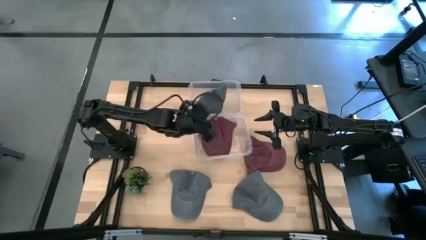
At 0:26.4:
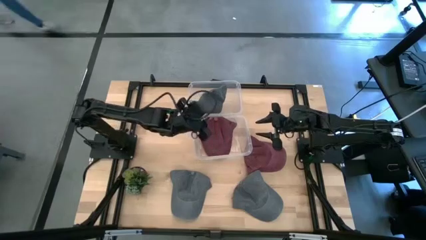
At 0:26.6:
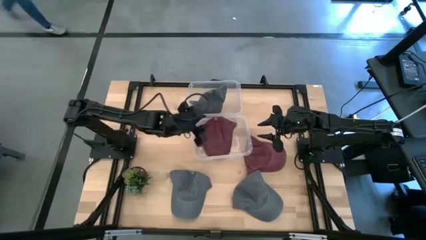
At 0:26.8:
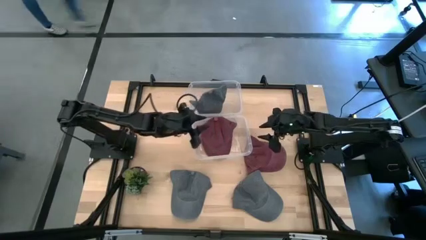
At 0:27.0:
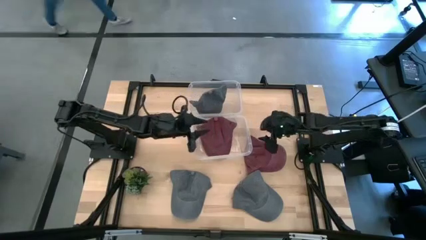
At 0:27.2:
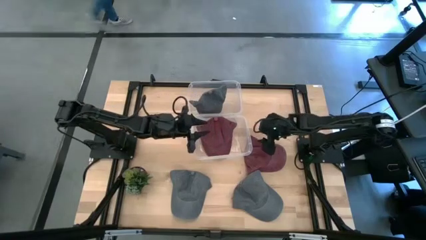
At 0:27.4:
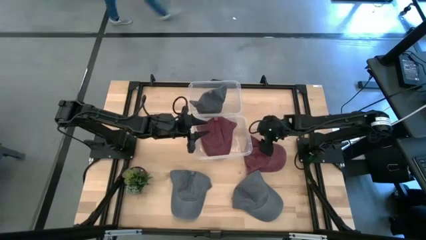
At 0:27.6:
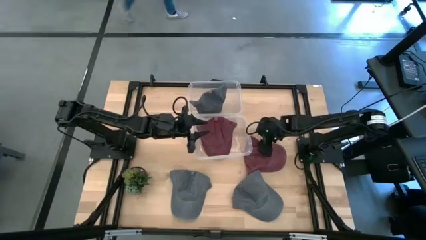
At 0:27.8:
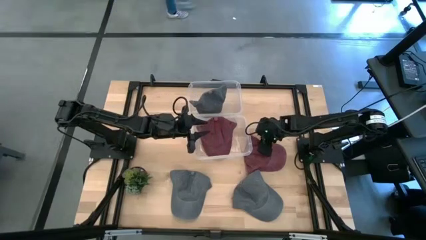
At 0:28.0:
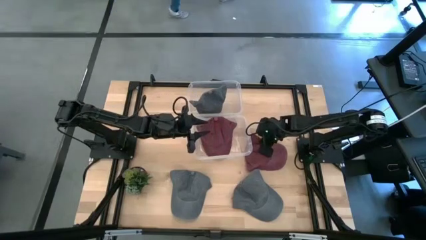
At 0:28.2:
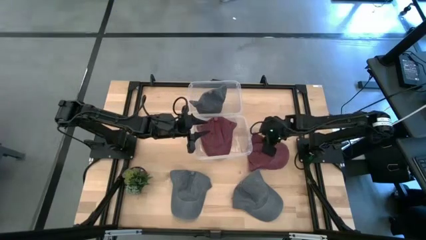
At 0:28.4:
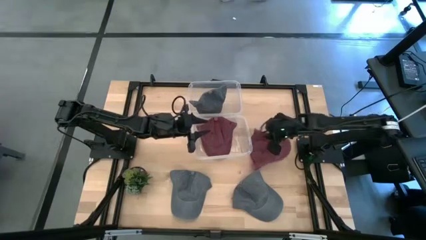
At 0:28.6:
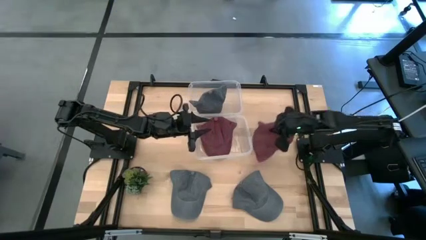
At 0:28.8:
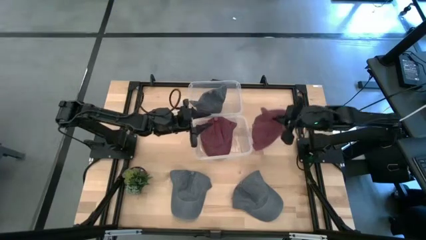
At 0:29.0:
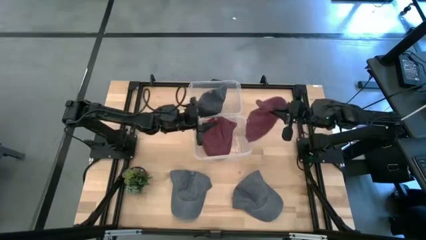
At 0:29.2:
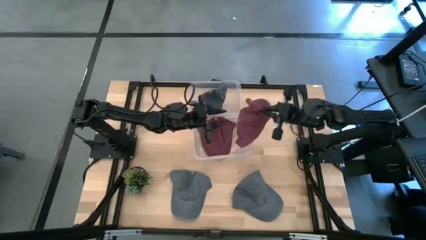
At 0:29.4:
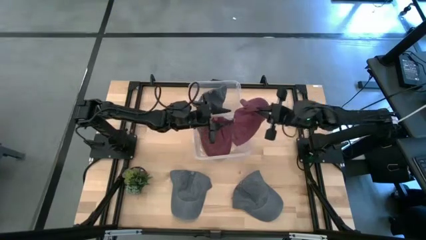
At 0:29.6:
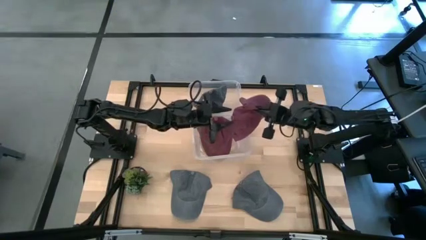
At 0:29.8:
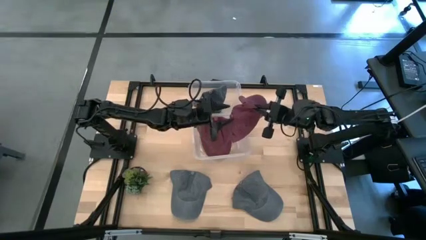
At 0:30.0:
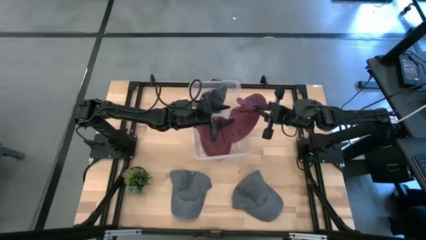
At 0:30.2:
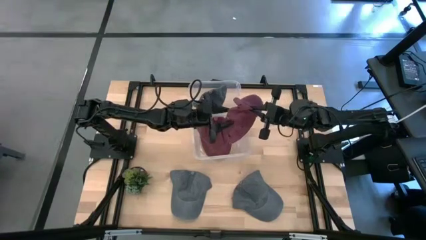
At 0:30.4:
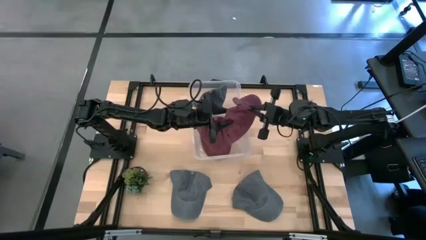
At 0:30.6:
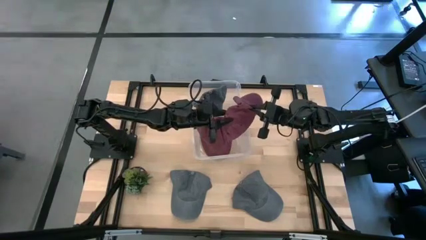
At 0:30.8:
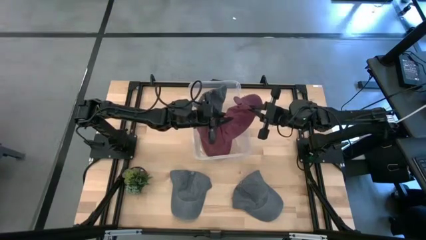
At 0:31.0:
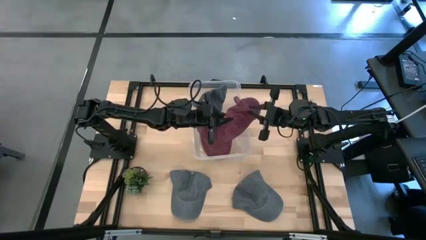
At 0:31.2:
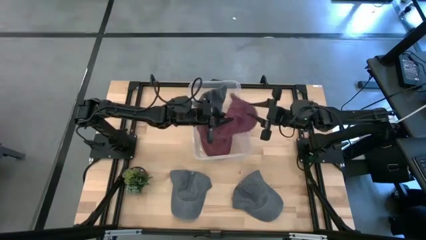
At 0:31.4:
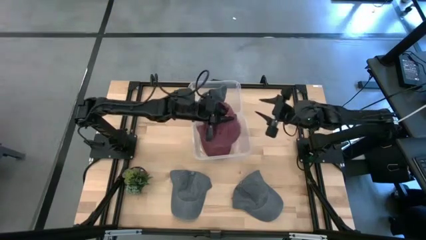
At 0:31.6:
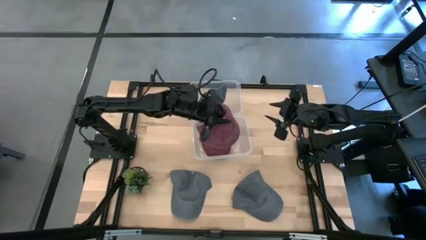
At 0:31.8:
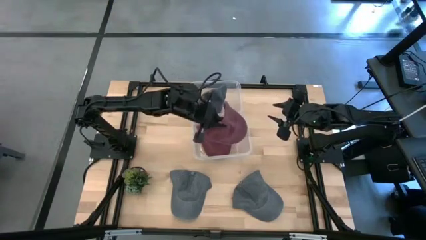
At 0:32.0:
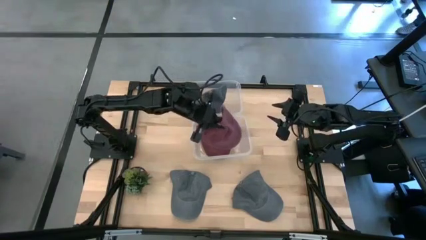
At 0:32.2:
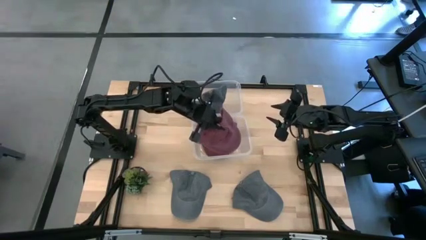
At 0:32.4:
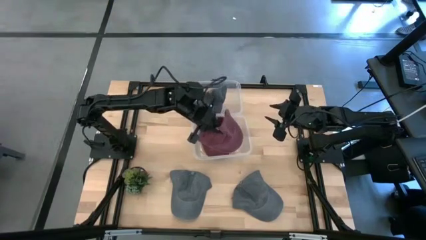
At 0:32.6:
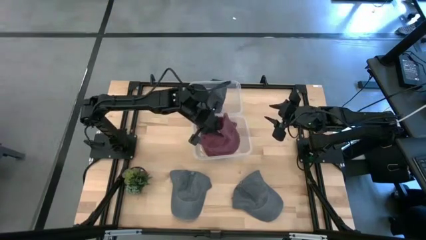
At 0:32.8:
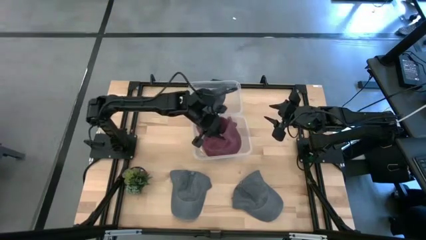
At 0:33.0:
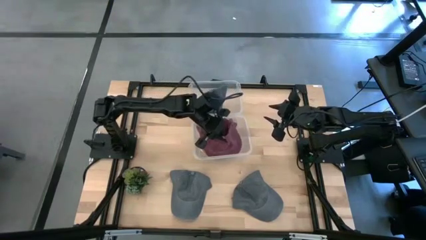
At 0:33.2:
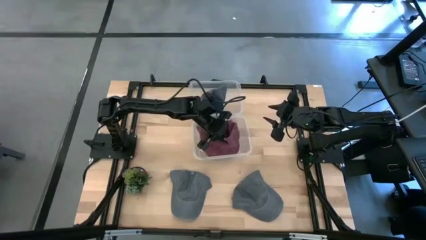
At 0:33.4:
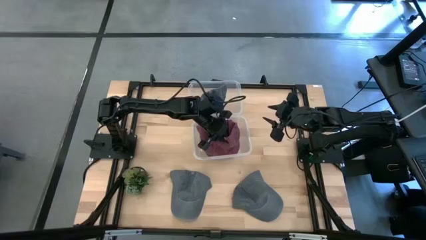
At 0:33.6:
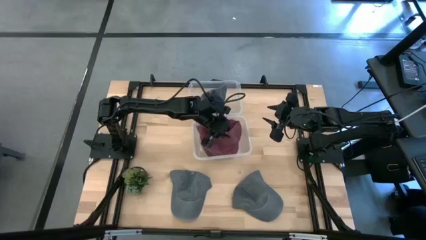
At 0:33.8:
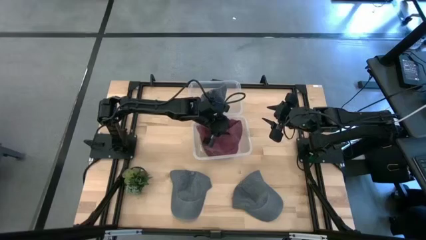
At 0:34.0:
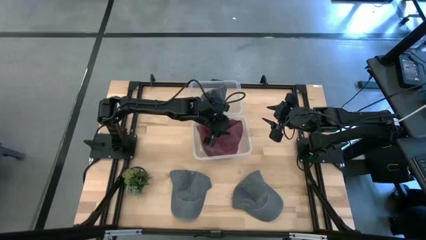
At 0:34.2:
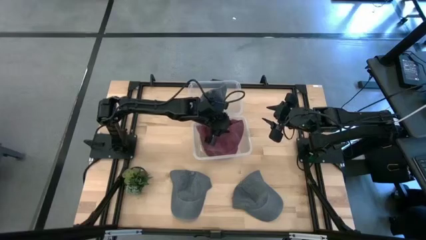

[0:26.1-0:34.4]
Task: Pick & Place hat
Put the red cap into the bottom transparent bin

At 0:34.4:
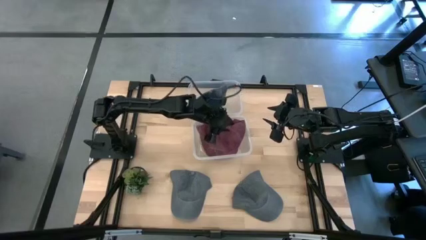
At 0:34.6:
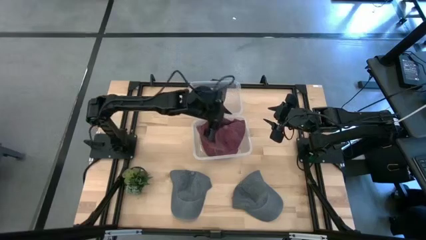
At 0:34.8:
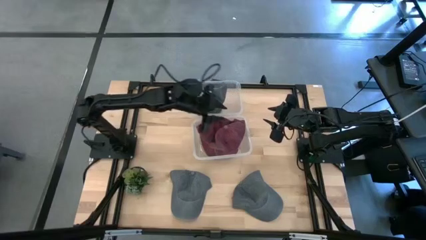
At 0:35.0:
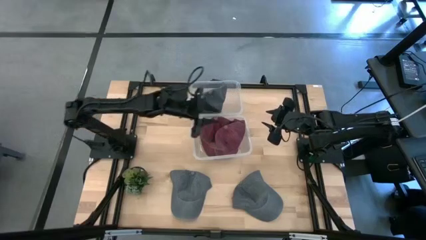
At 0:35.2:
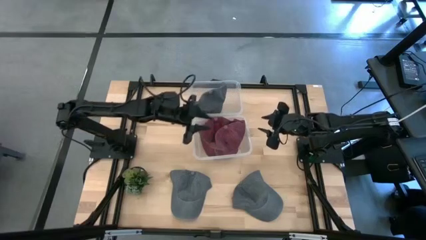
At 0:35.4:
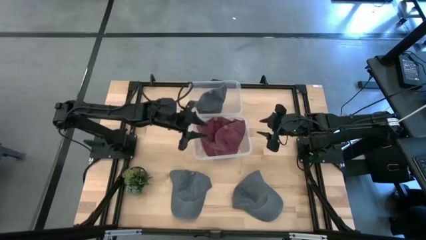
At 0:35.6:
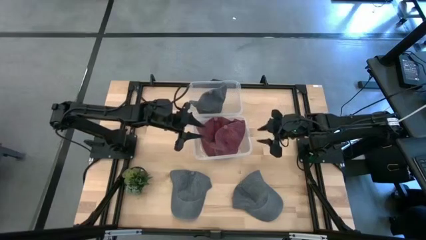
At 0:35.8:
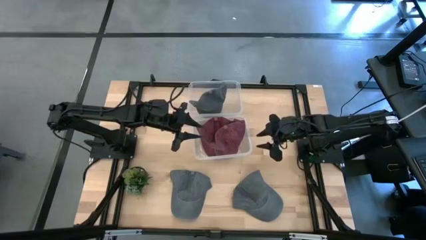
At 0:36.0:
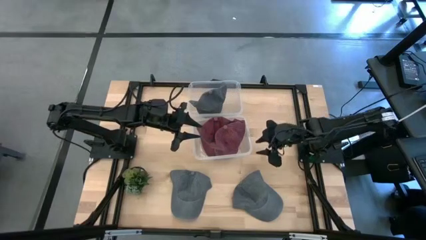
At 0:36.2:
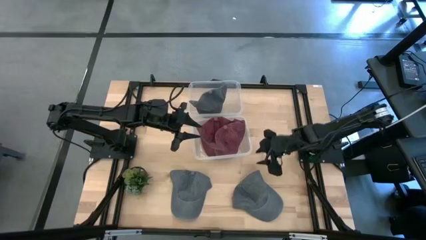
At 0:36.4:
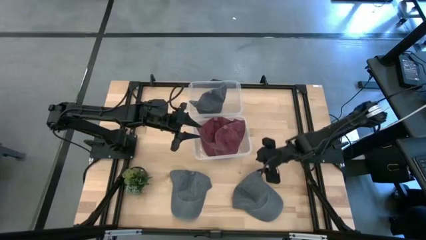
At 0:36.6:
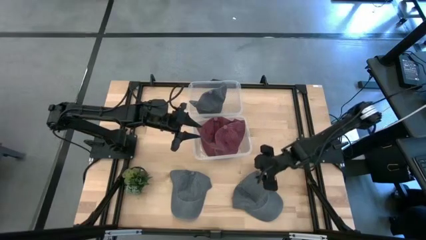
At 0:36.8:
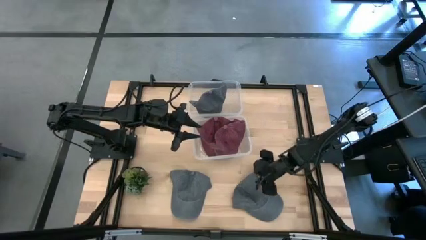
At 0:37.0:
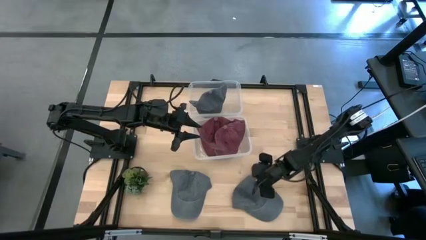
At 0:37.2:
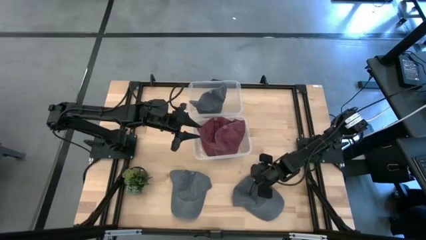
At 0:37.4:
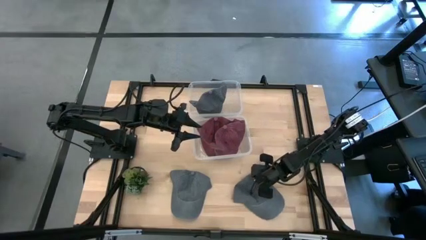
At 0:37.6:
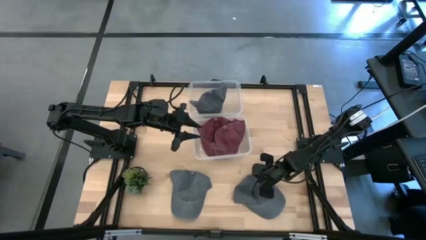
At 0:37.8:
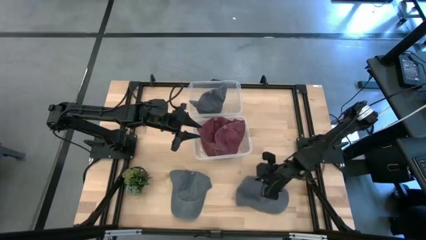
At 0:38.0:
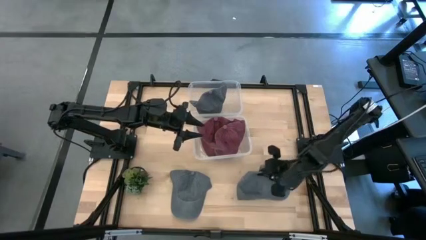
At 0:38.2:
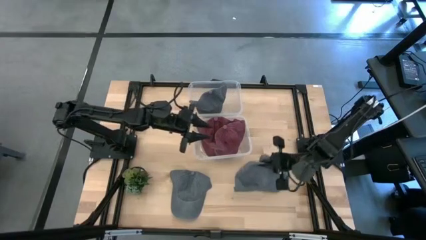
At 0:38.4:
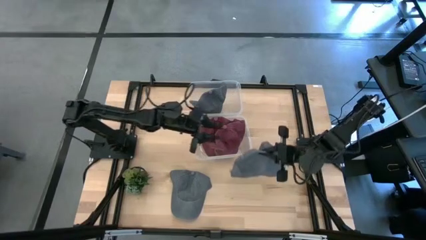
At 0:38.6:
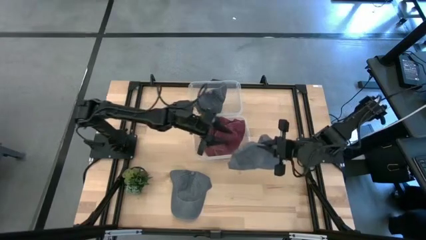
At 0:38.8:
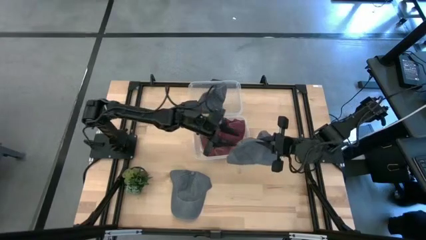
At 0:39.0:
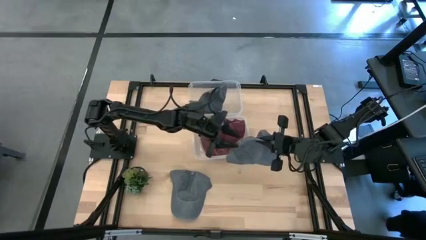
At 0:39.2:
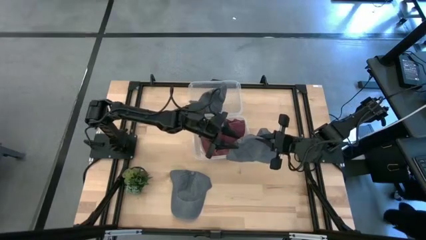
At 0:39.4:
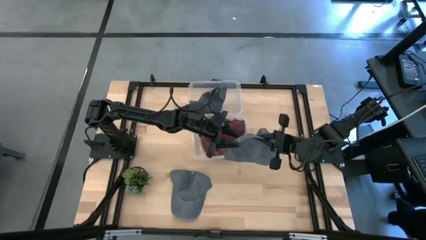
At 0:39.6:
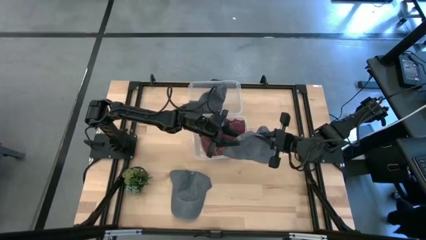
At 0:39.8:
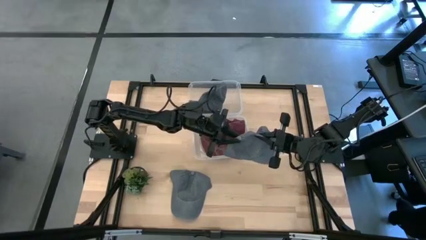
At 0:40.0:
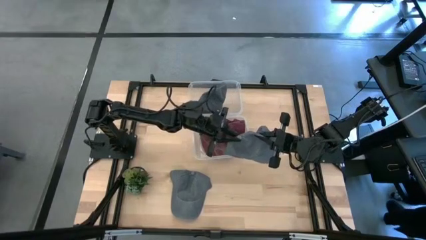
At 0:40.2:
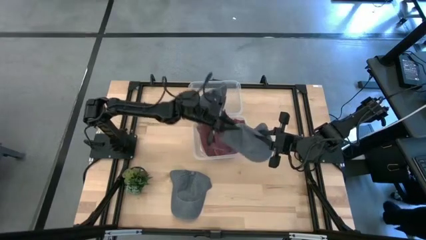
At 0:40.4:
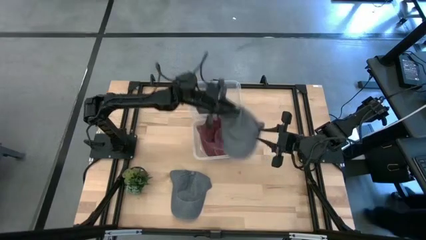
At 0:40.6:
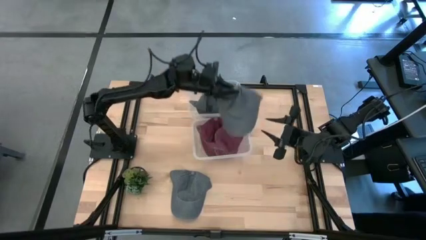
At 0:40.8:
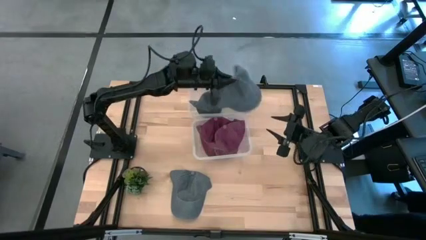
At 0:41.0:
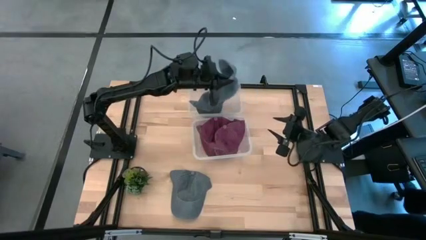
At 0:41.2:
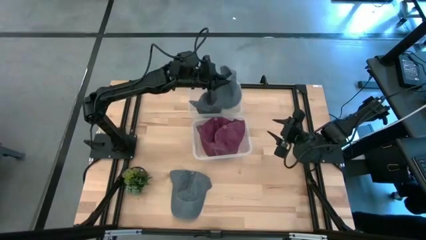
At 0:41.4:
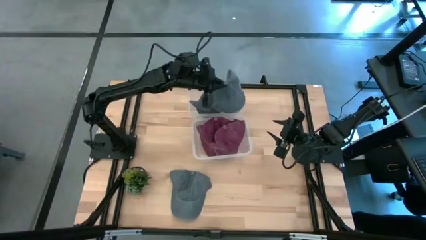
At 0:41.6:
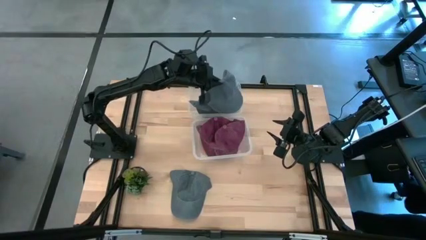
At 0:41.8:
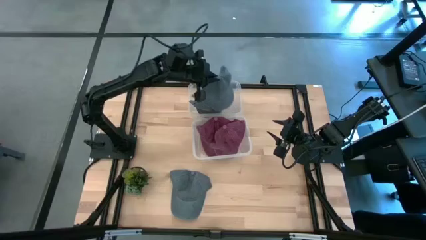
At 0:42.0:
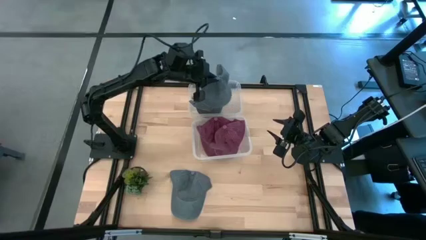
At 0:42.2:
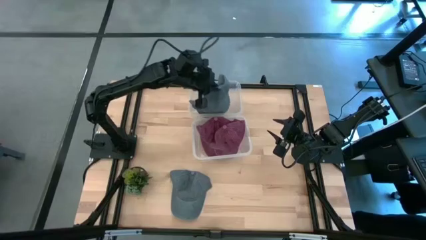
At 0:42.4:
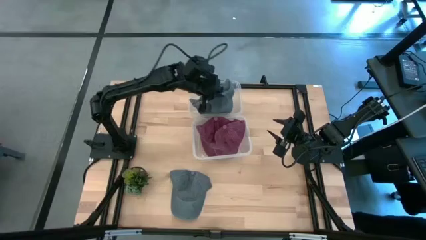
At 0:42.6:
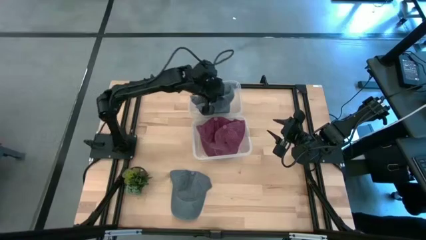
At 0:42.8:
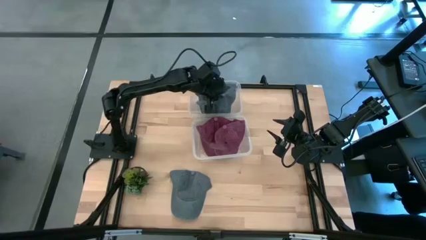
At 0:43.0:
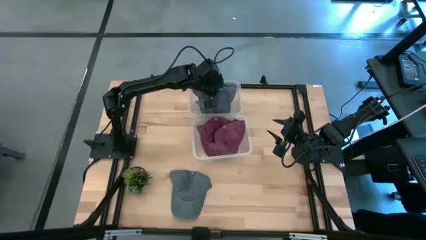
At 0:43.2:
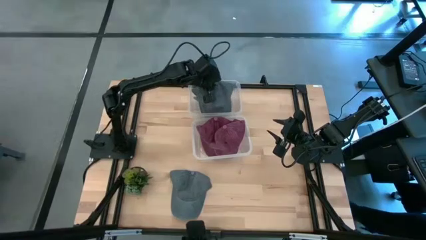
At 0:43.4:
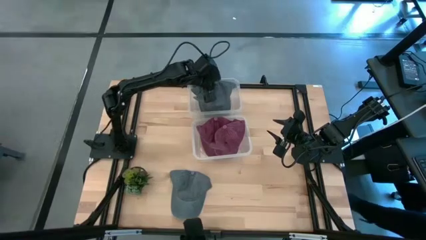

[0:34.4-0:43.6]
Put the right gray cap into the top transparent bin
